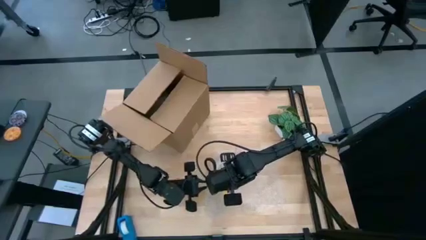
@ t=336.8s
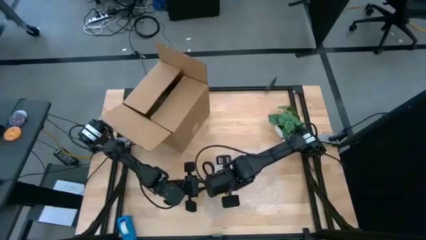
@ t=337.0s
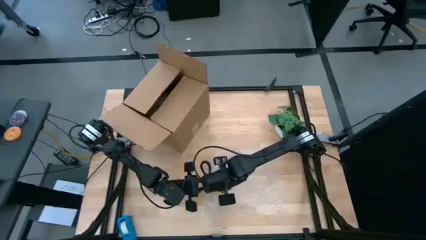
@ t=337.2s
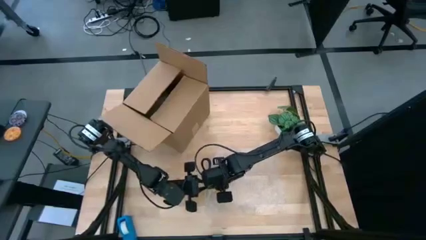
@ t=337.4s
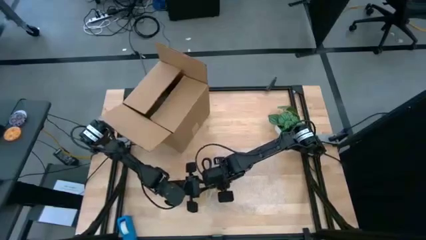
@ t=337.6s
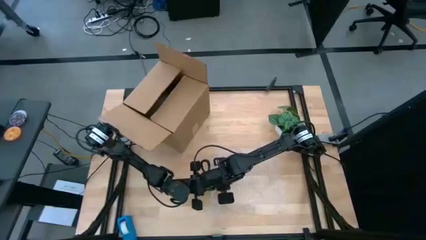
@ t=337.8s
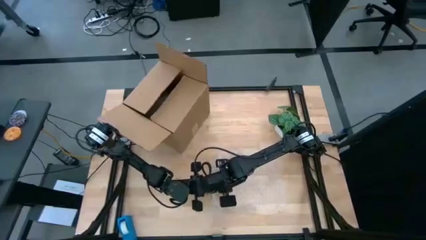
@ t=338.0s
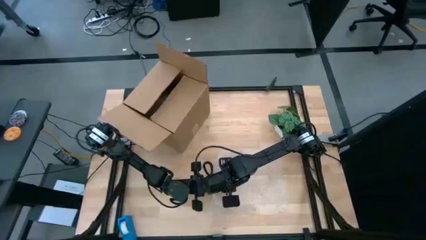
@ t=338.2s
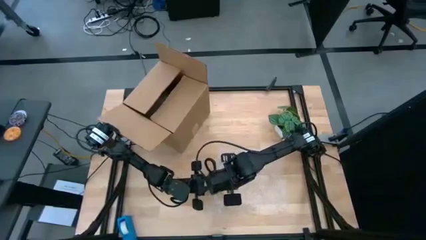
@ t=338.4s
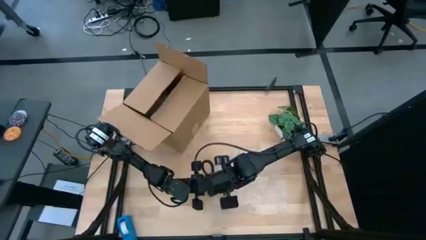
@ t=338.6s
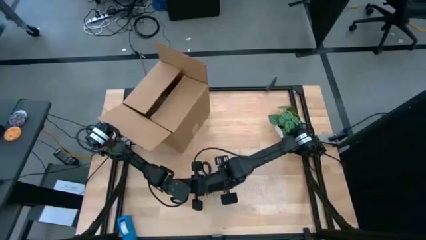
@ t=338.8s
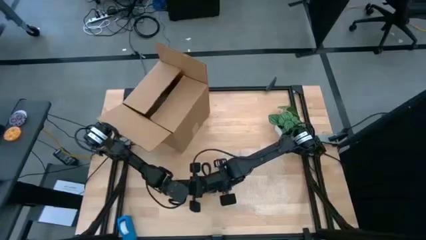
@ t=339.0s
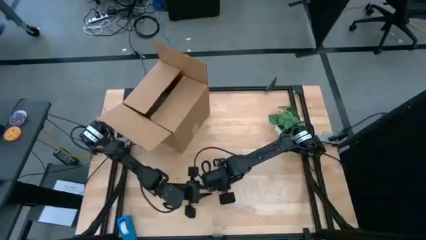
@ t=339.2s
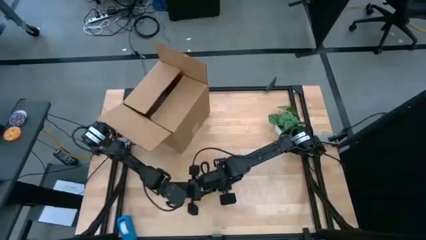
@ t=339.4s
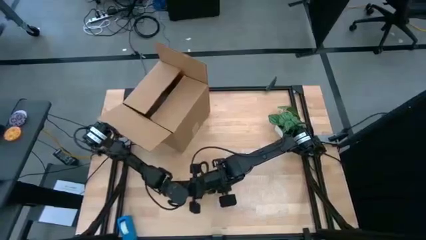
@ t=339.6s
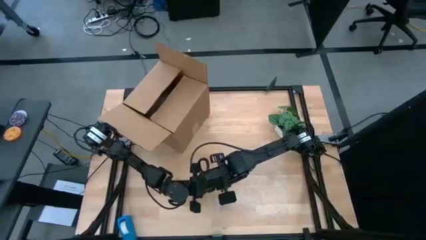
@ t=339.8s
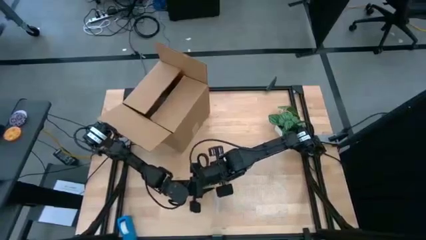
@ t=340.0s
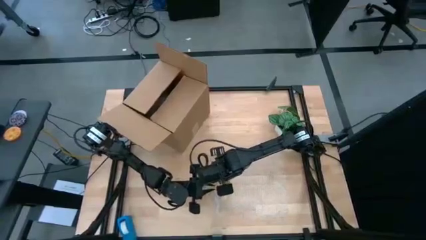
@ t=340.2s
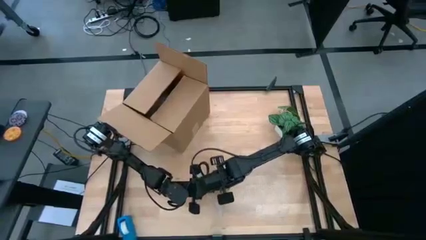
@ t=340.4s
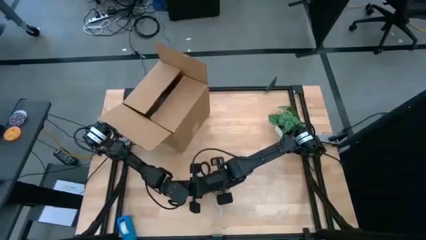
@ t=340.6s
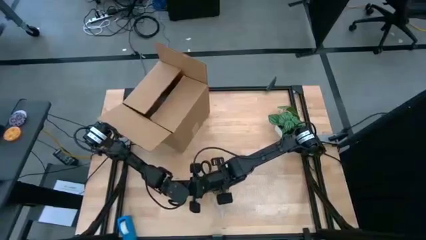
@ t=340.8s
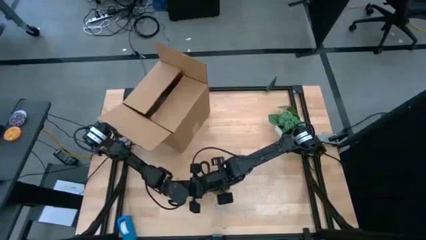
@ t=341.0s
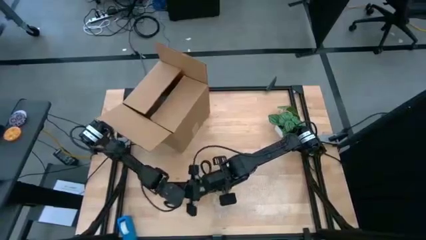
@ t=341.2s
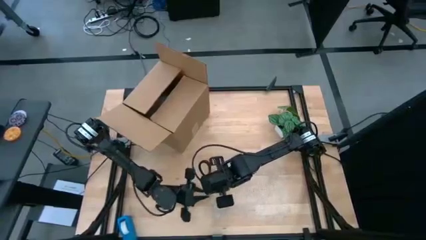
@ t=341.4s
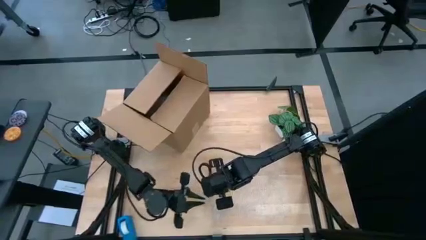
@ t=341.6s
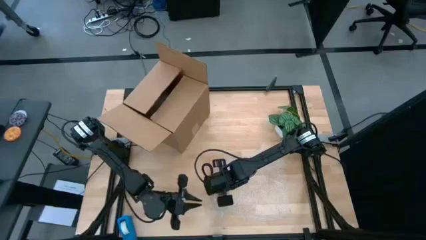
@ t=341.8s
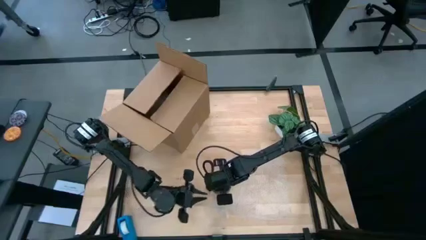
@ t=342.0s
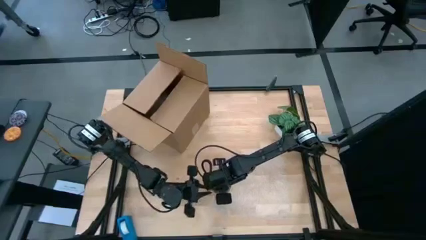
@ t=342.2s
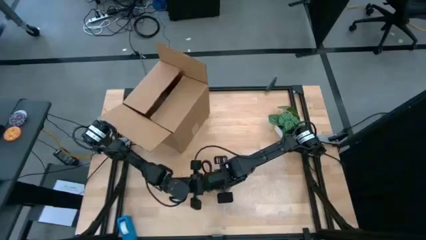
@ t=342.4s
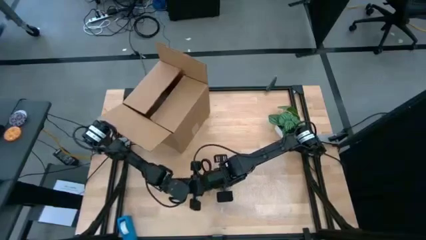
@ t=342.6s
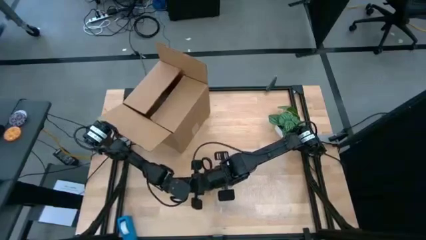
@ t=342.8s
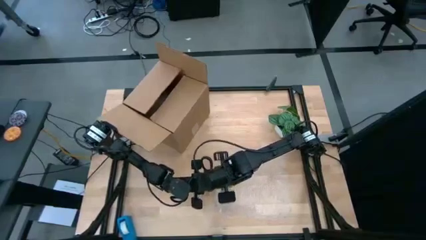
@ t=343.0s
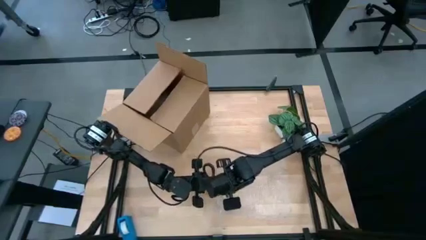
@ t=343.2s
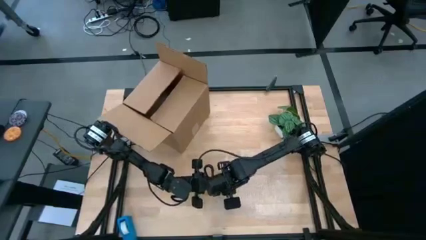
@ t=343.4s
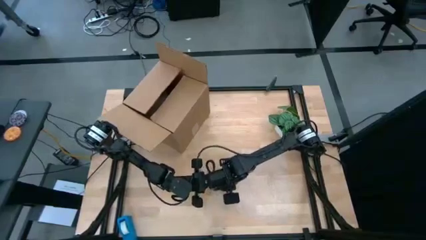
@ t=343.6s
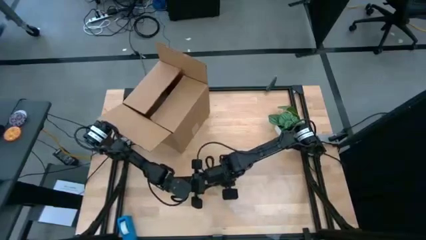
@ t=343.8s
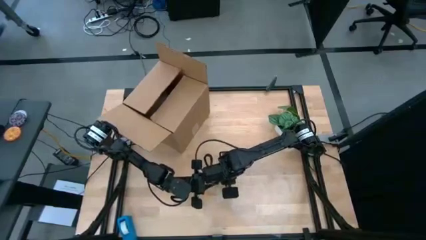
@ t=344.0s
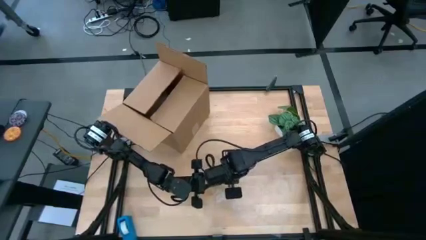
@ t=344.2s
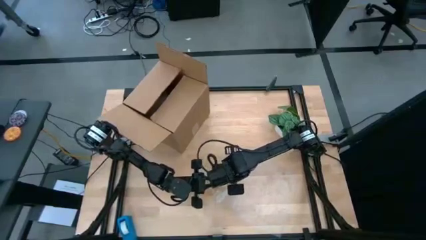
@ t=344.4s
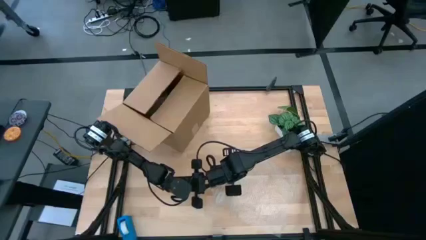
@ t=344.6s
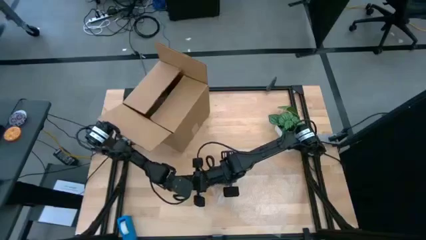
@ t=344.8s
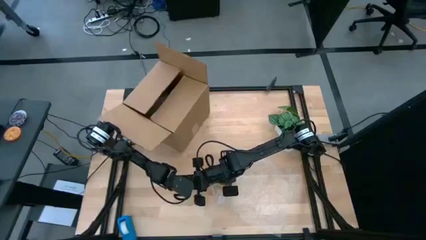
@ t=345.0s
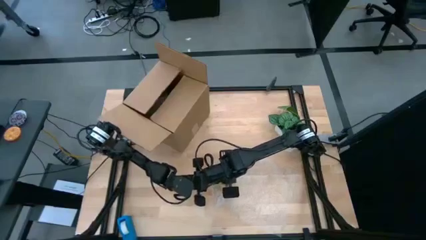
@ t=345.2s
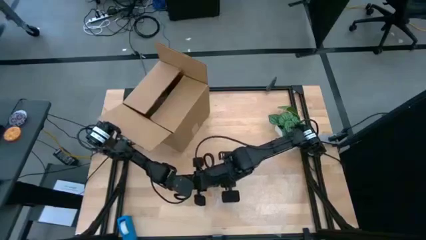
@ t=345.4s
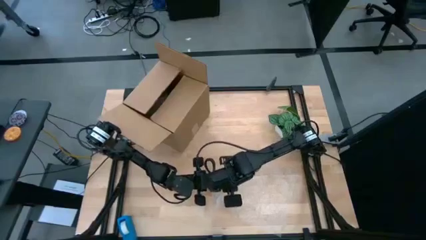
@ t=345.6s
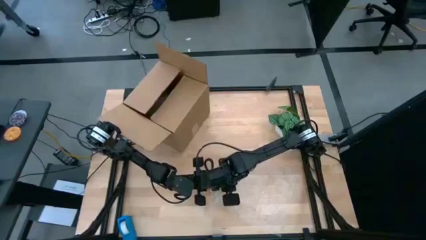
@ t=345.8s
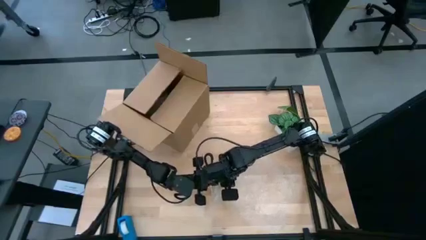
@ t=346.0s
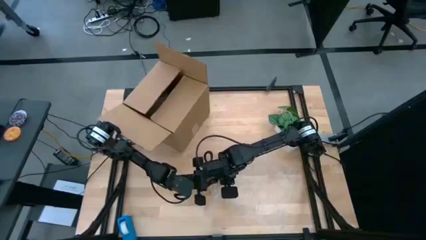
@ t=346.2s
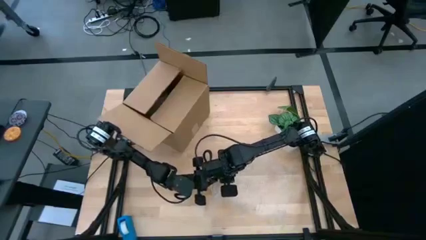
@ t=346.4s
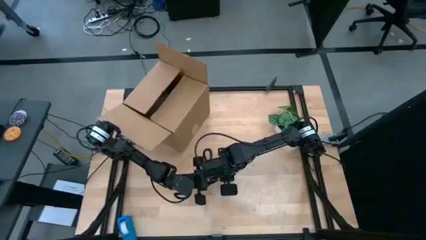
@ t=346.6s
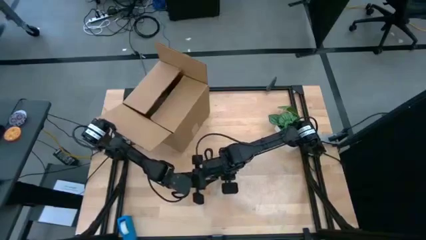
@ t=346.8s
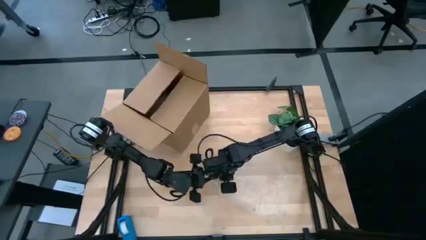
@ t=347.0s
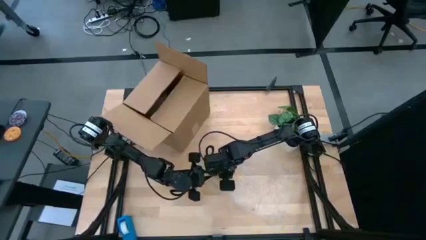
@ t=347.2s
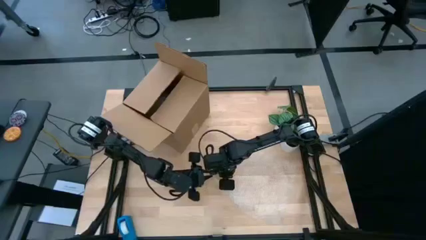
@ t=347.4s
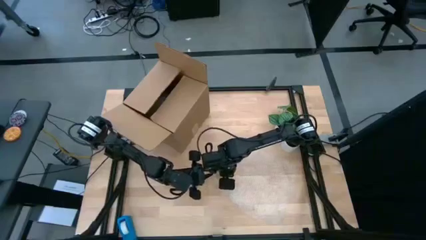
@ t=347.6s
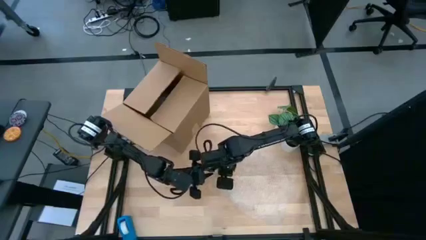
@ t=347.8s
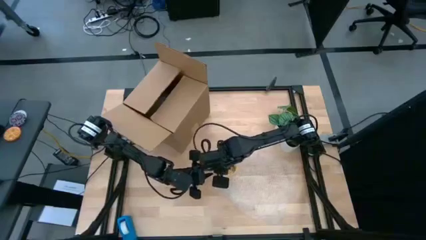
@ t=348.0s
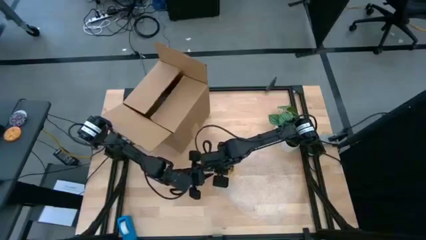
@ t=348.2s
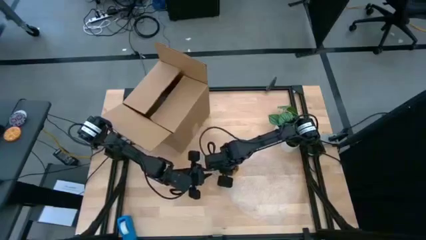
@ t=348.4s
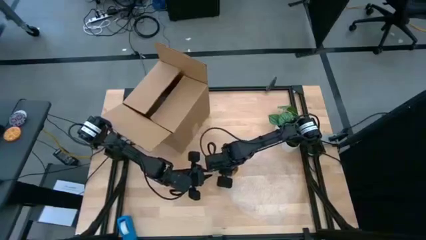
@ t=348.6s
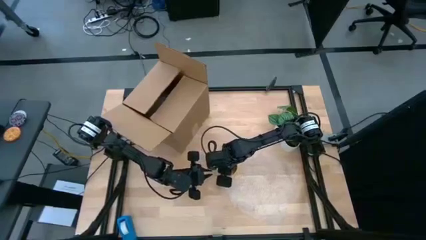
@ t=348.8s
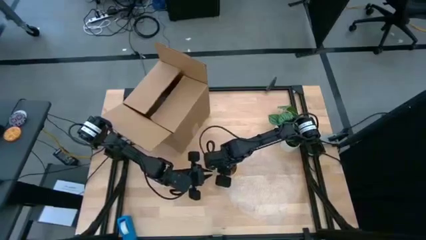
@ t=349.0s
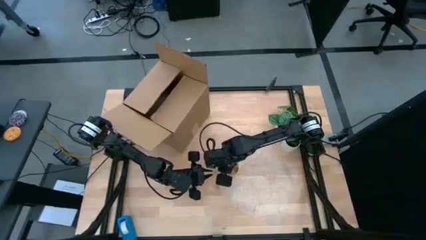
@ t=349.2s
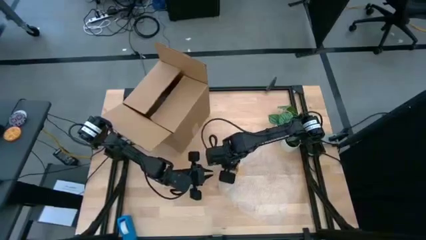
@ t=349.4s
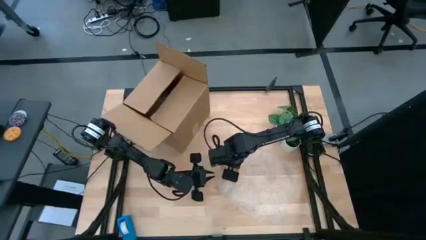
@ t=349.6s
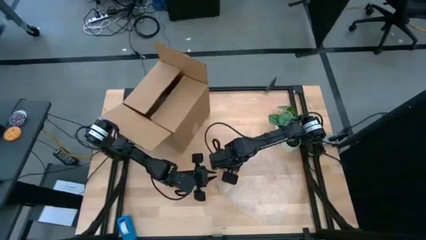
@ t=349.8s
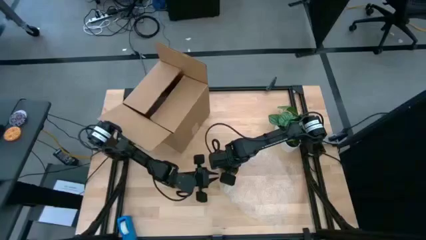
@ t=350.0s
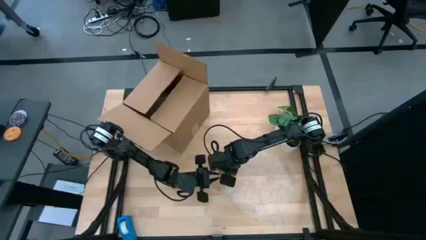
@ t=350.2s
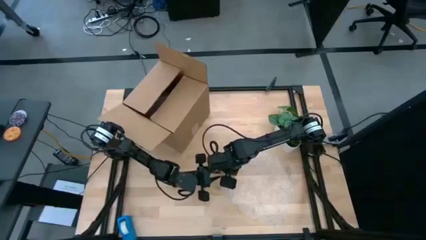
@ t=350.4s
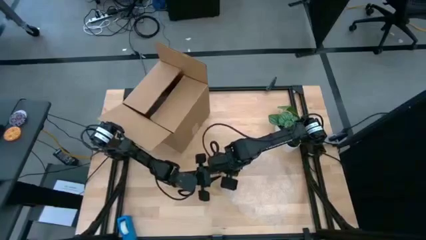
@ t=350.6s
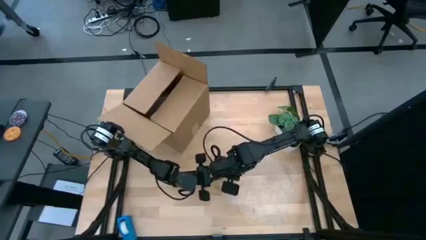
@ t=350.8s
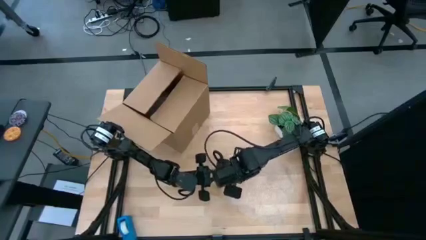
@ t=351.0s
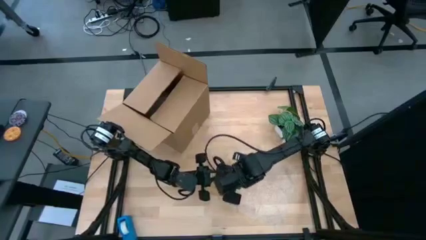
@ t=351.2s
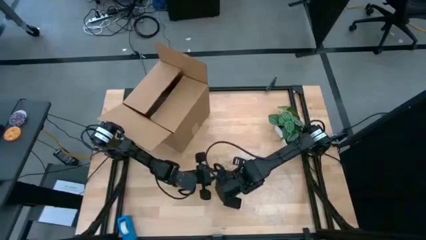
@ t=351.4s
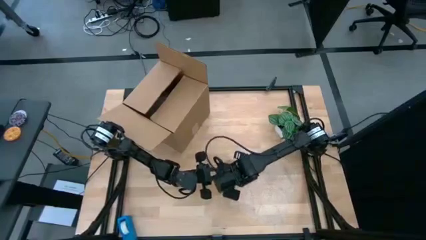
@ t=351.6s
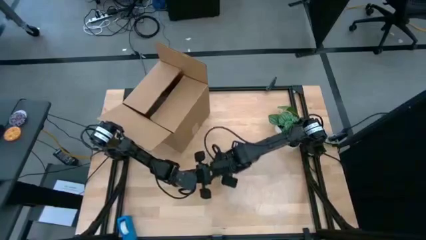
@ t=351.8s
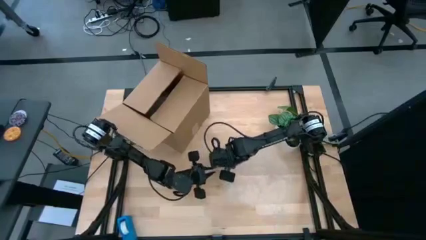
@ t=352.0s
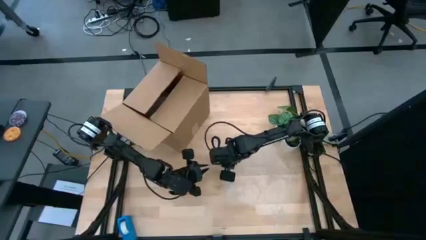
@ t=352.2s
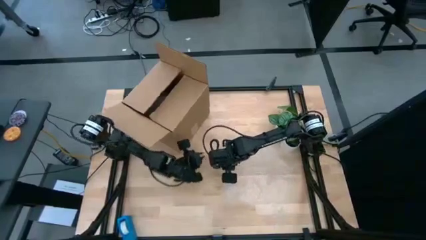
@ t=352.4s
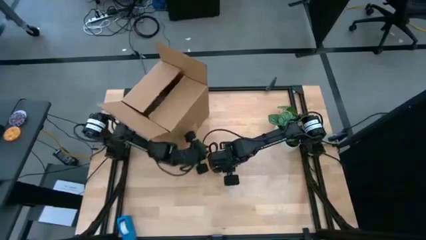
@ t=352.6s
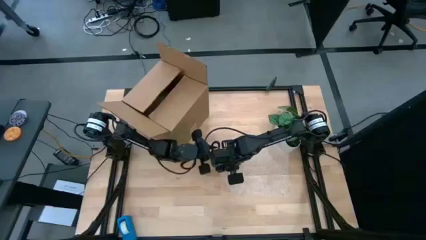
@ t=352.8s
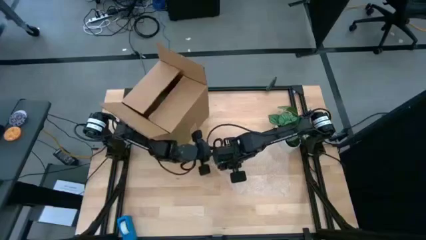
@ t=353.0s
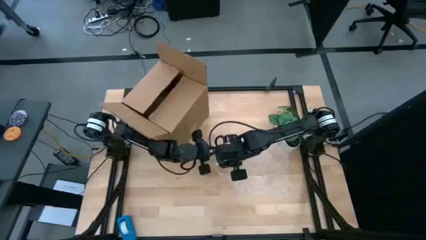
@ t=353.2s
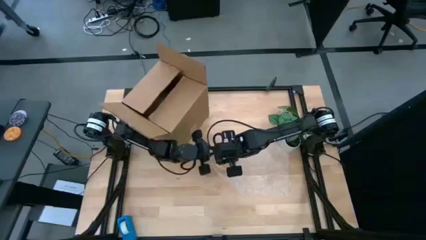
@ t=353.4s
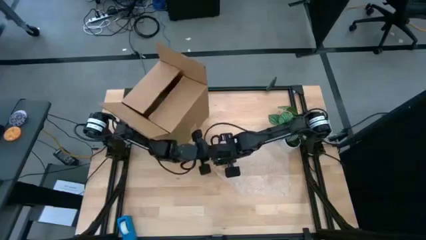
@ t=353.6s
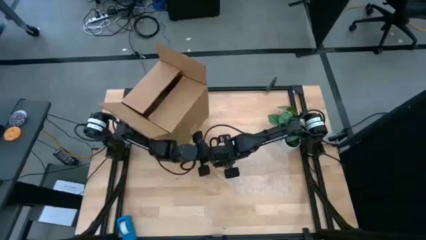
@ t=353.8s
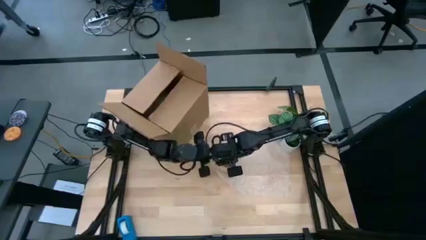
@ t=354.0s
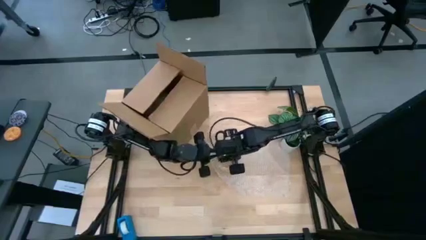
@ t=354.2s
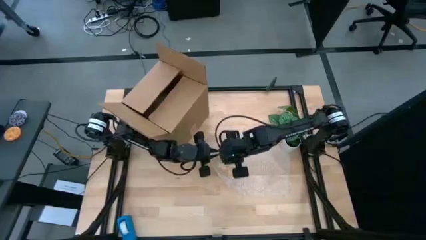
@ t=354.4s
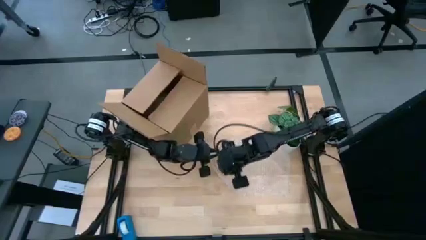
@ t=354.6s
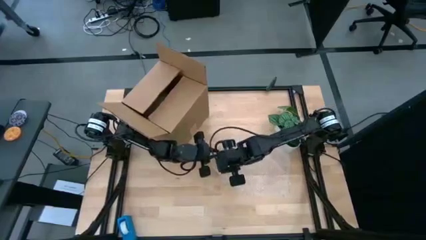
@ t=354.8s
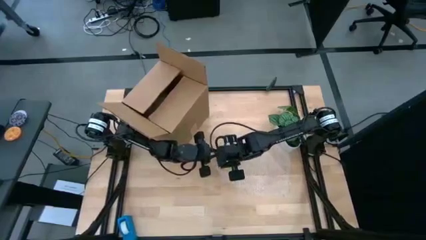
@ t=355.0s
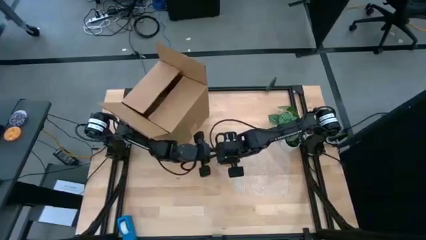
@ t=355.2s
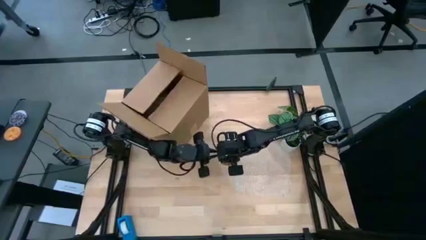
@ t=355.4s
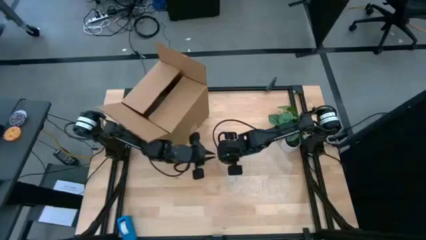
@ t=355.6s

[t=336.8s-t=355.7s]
Task: wrap mug
Wrap the yellow mug with the bubble wrap
